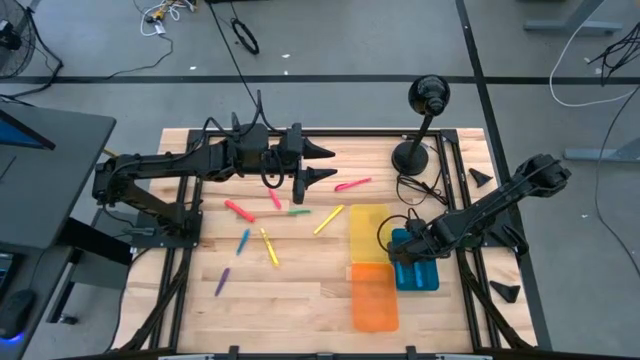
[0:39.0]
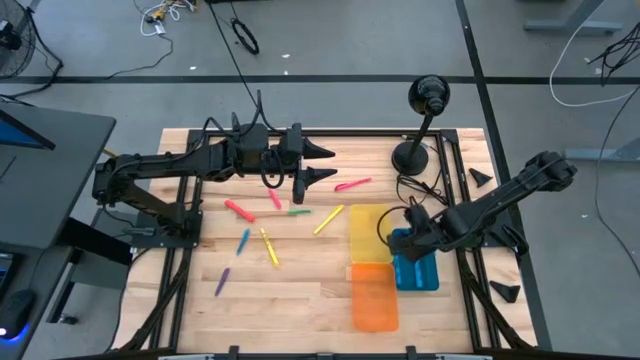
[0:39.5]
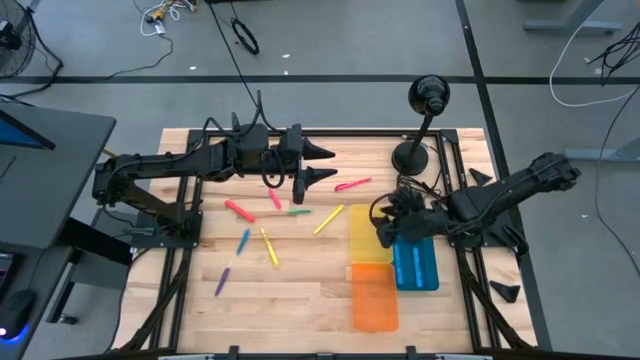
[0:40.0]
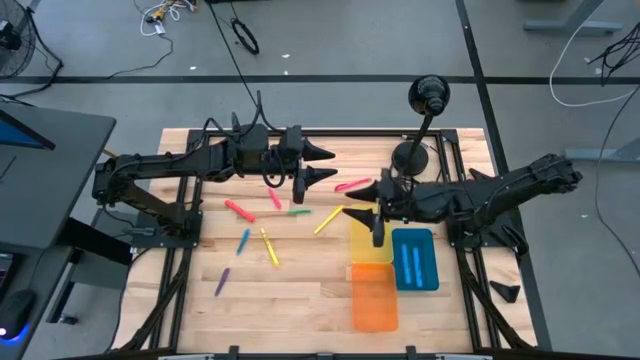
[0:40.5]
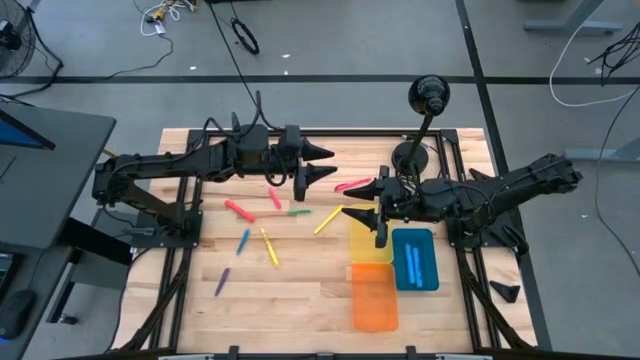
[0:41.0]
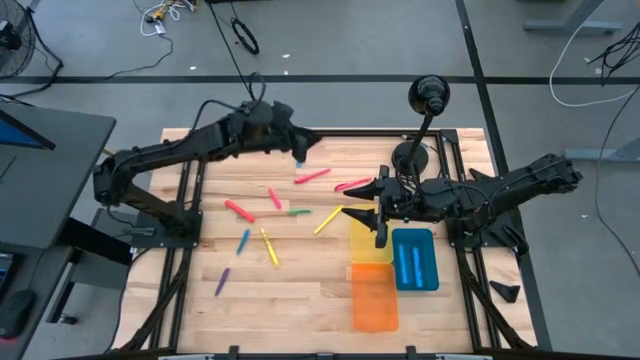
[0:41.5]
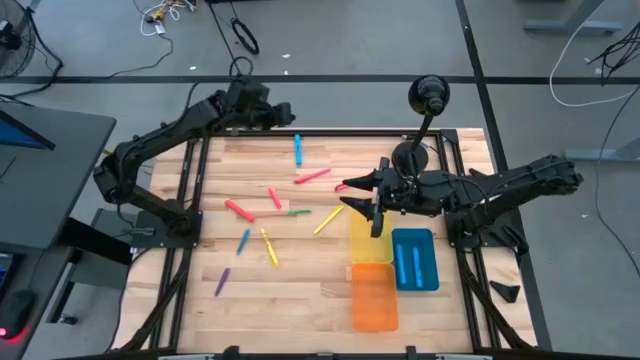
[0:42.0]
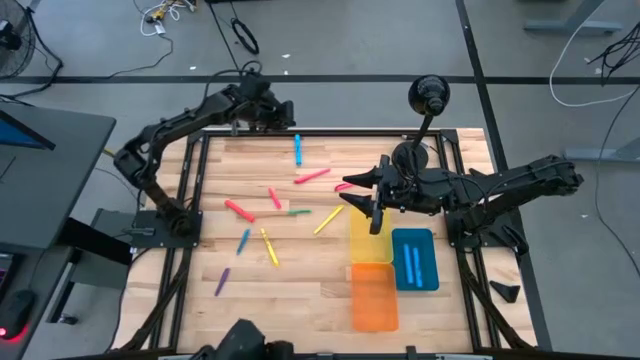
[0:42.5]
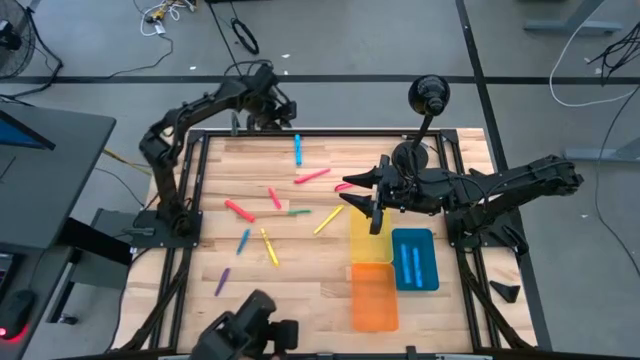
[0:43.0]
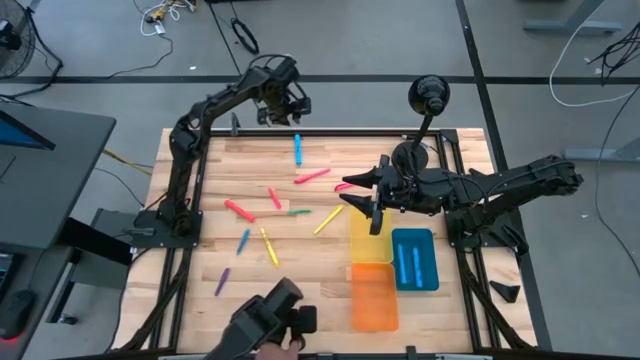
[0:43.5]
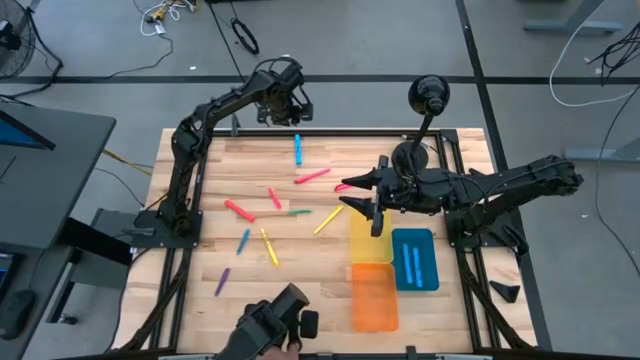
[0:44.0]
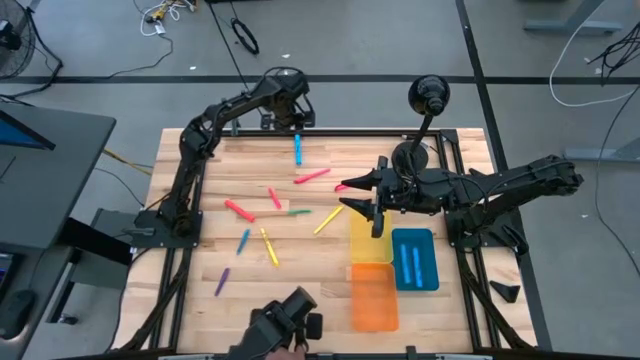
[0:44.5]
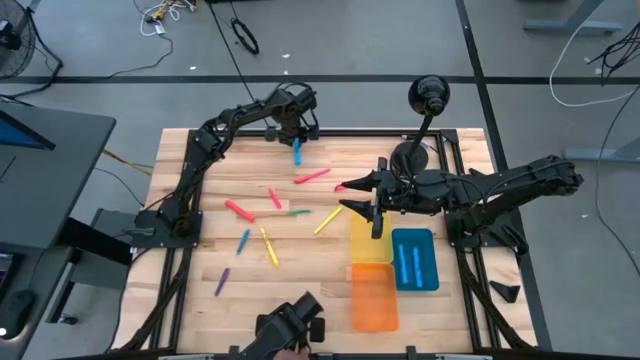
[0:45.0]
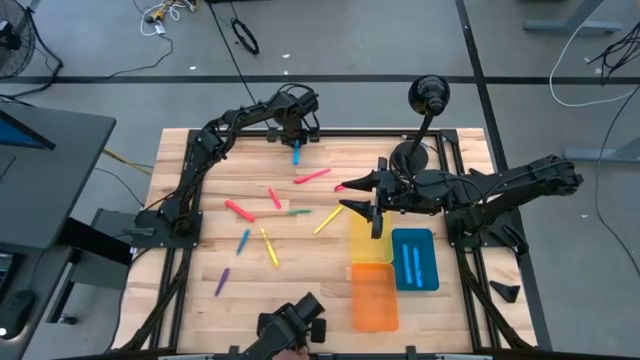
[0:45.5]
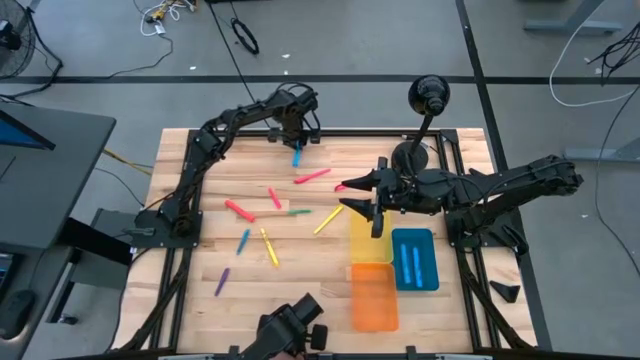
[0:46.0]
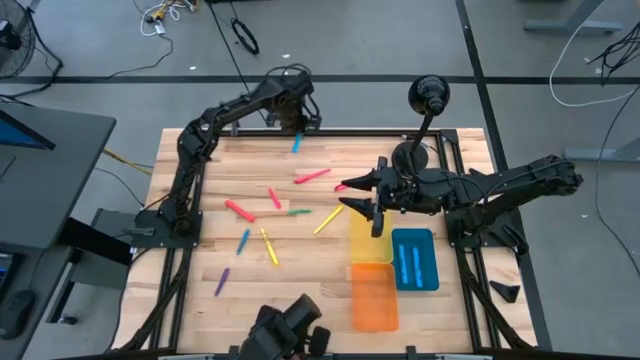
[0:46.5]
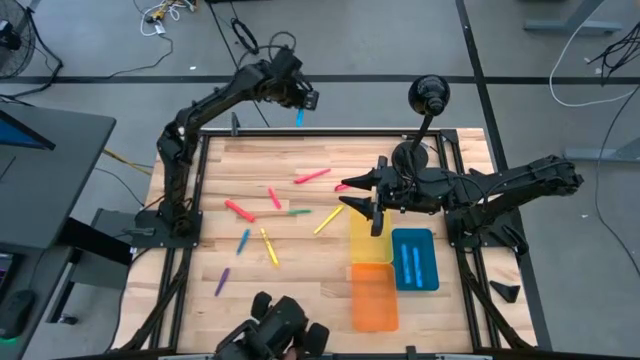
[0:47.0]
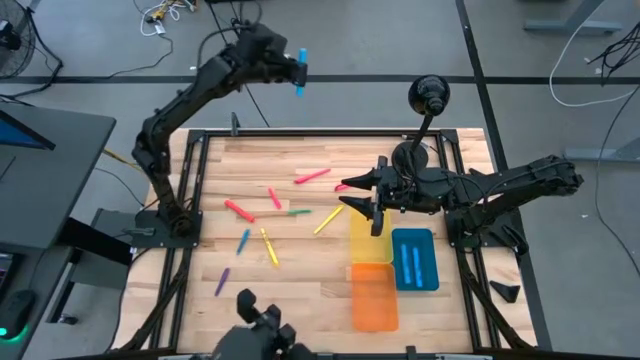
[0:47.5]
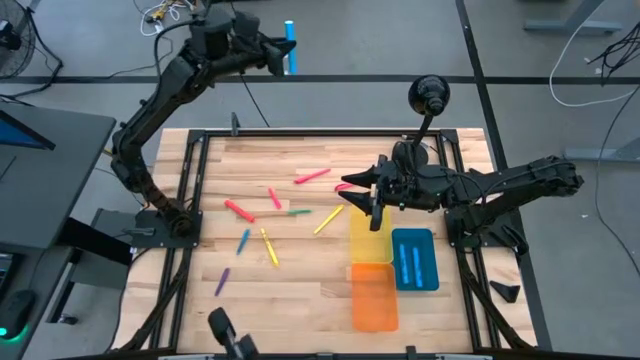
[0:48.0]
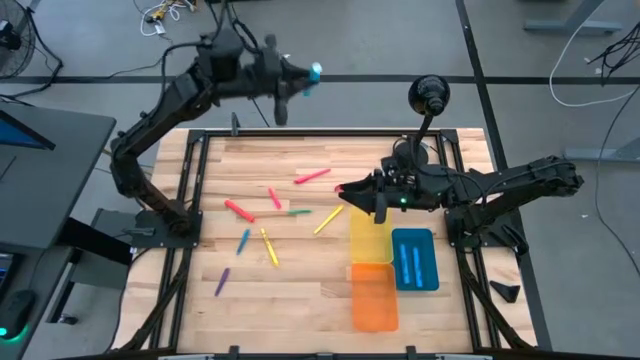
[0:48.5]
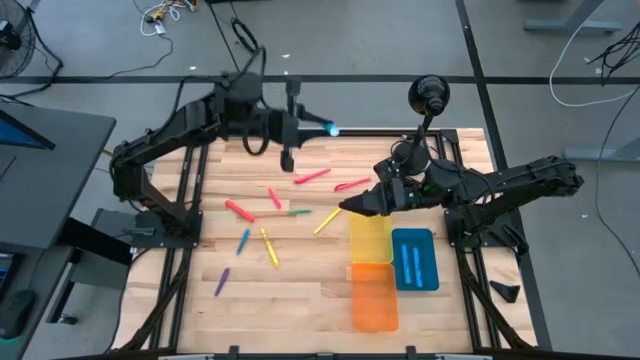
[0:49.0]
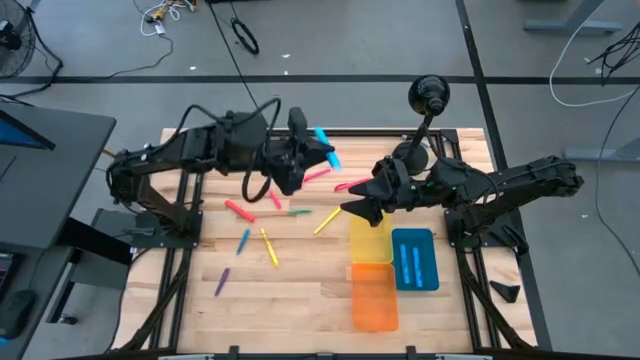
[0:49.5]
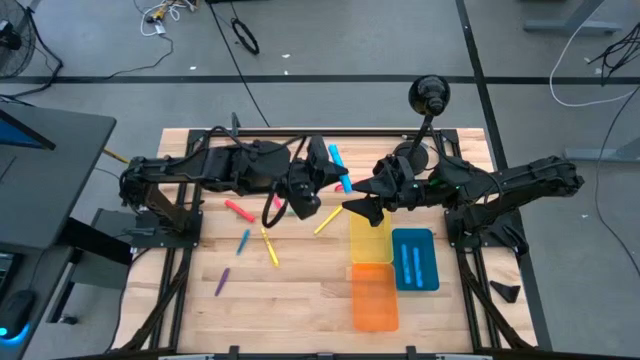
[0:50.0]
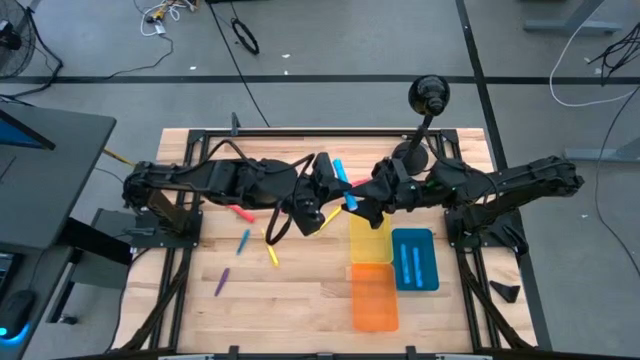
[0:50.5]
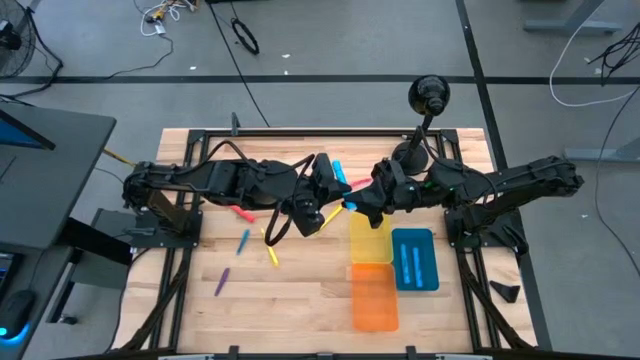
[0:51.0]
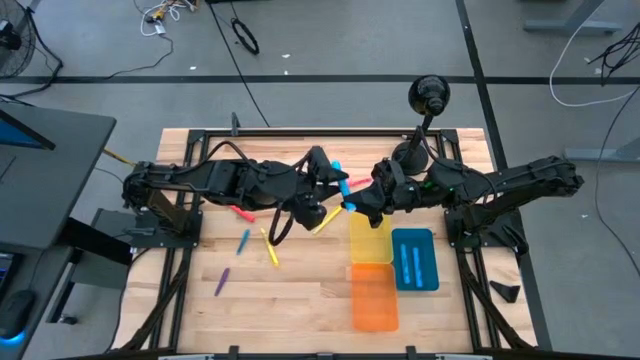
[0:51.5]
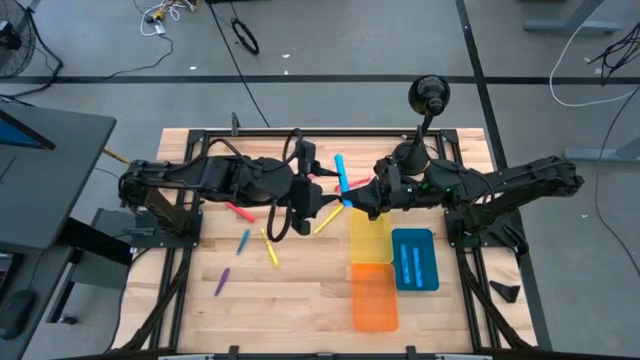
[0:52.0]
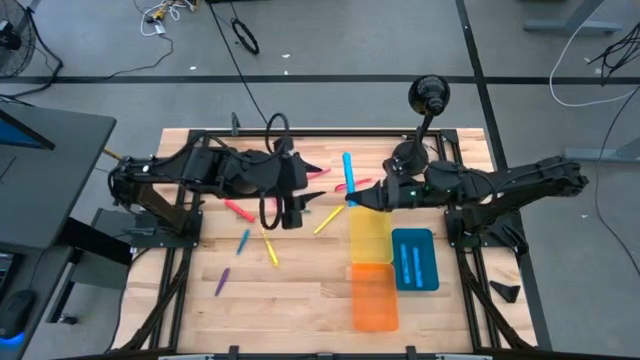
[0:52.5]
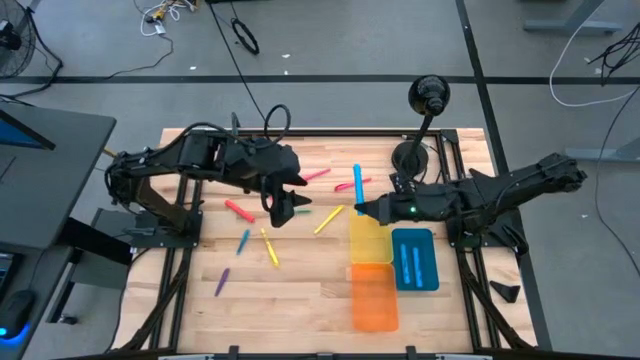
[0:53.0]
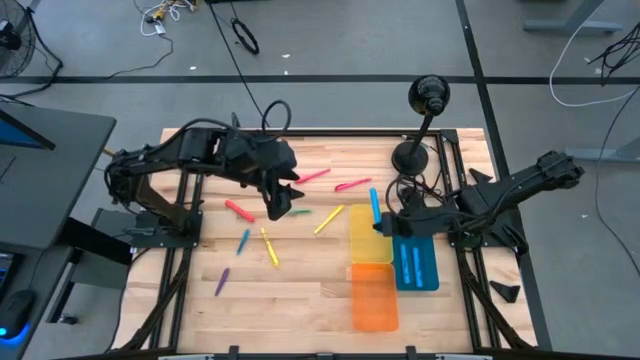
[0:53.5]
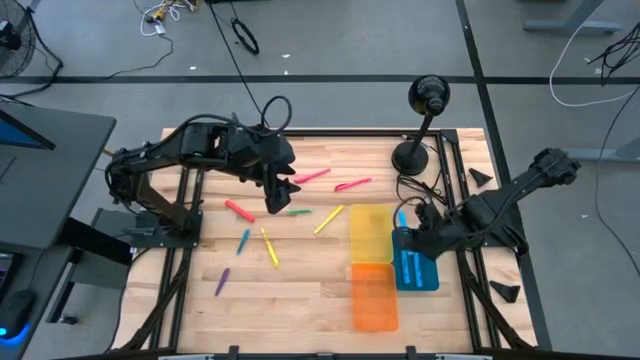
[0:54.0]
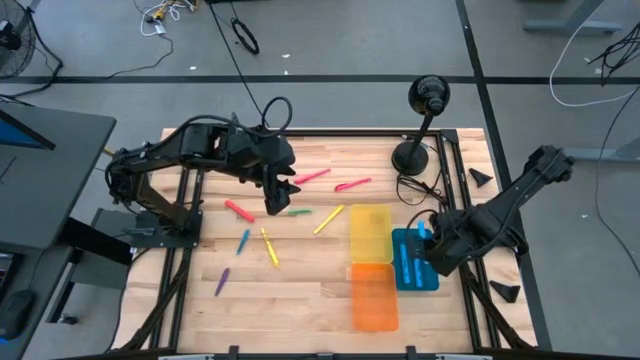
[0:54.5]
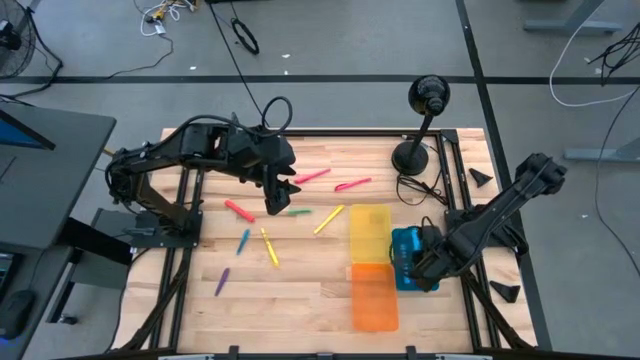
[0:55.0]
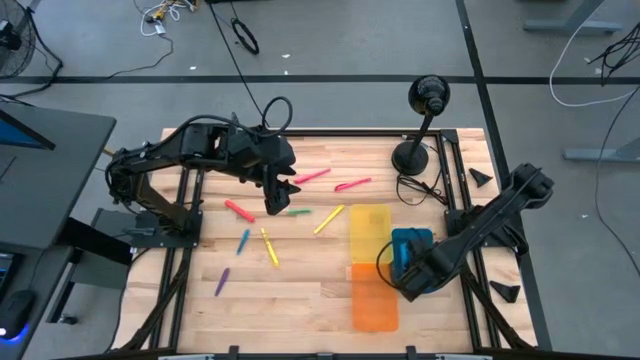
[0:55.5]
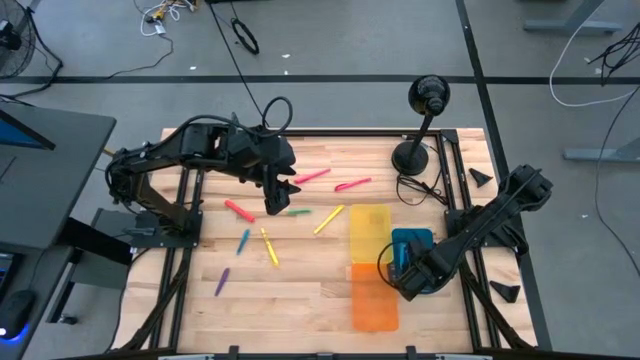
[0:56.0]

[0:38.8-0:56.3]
Task: Pick & Place Markers
Put the blue highlighter into the blue bin

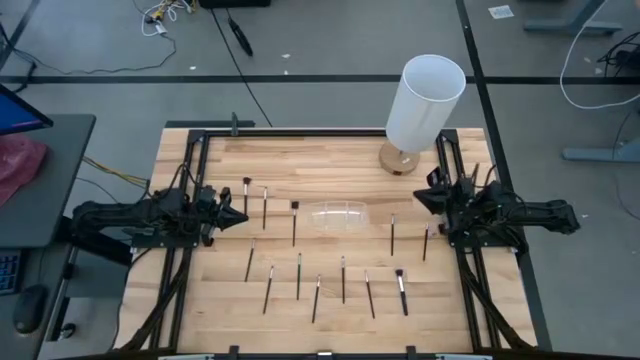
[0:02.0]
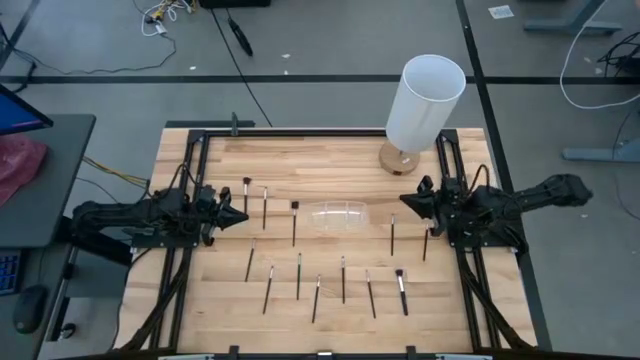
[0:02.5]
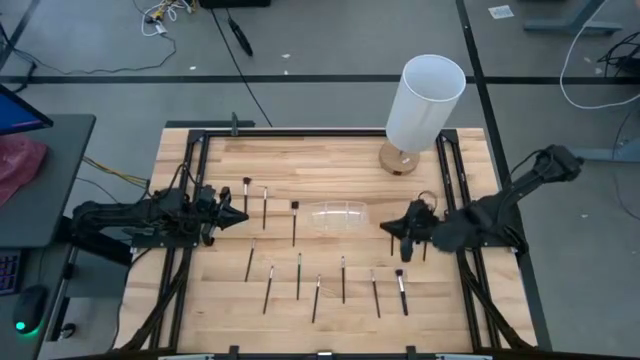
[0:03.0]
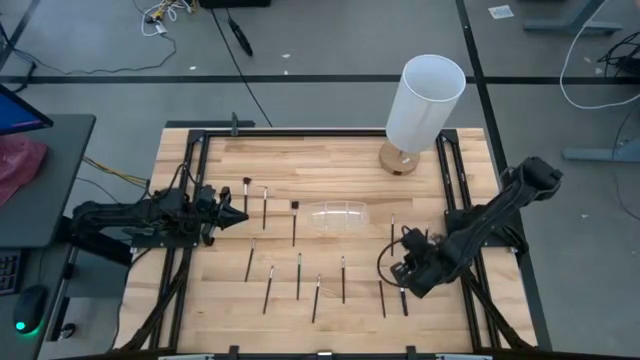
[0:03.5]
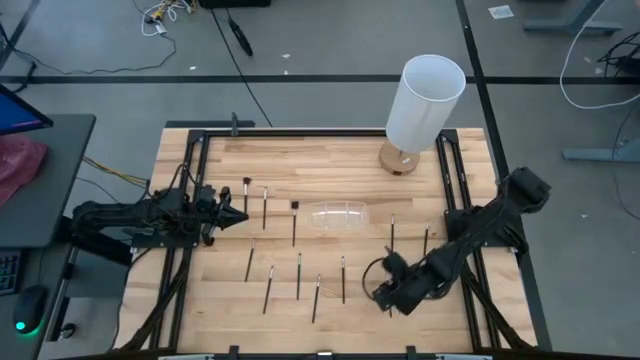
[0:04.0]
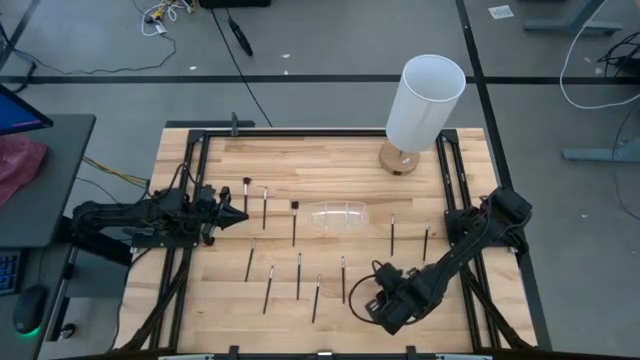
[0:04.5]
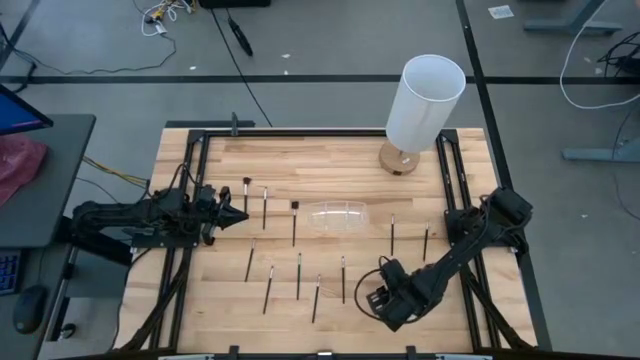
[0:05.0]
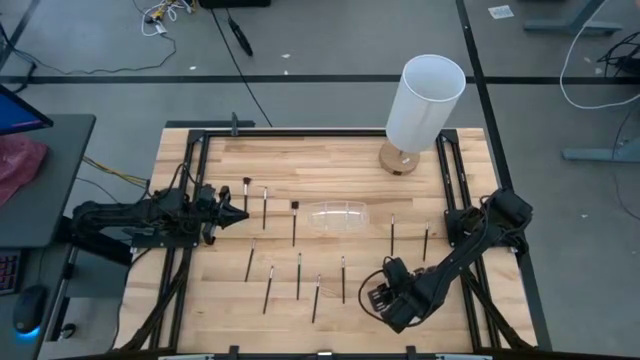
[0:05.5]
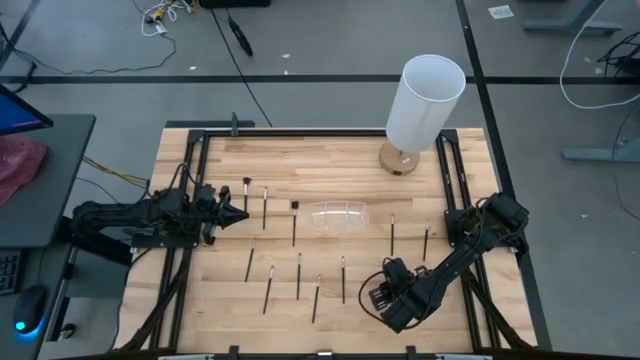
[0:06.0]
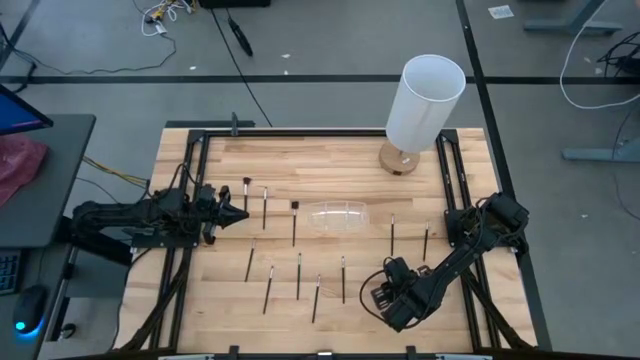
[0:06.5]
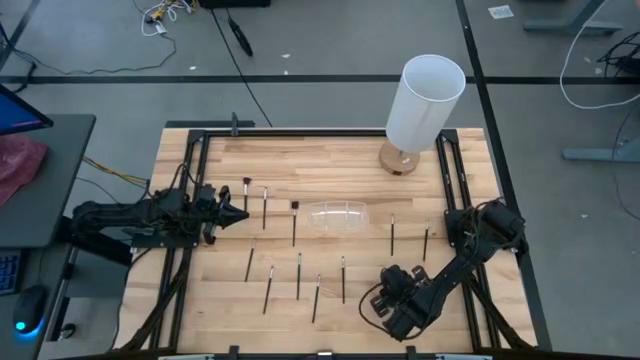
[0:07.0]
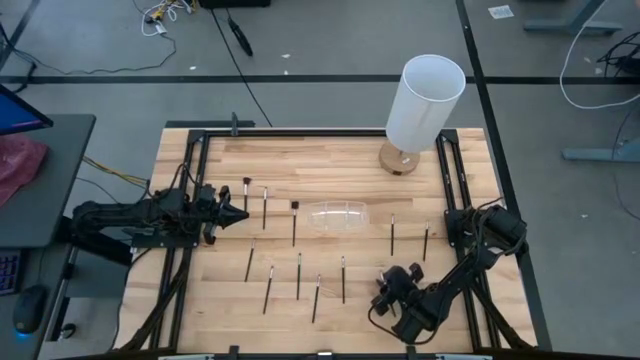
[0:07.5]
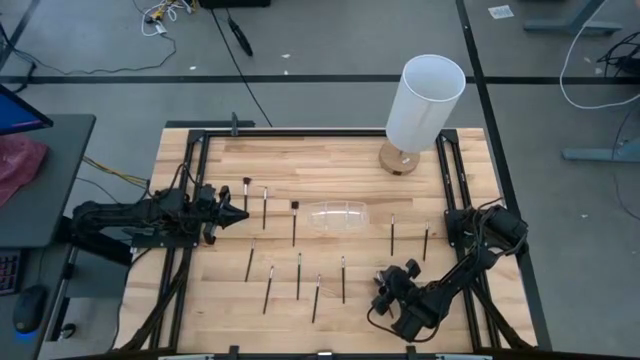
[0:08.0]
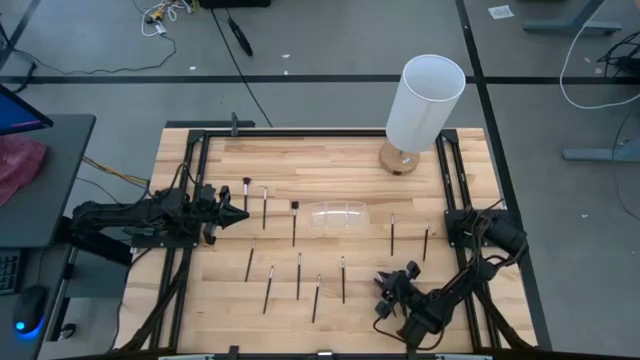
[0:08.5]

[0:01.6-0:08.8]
Task: Pick & Place Makeup Supplies
Put the black makeup brush into the transparent organizer
